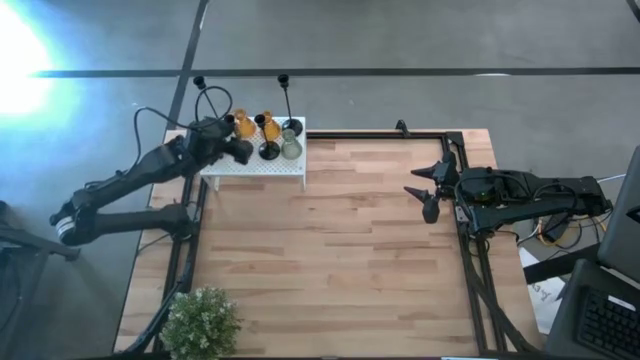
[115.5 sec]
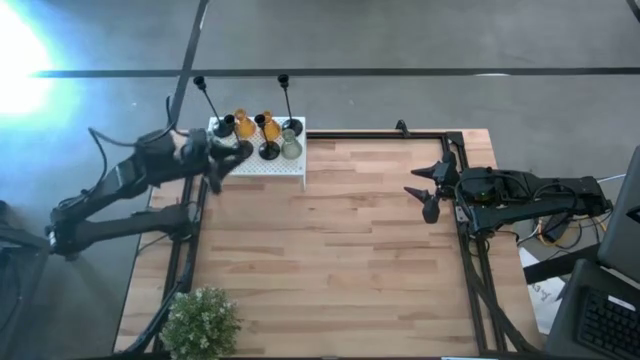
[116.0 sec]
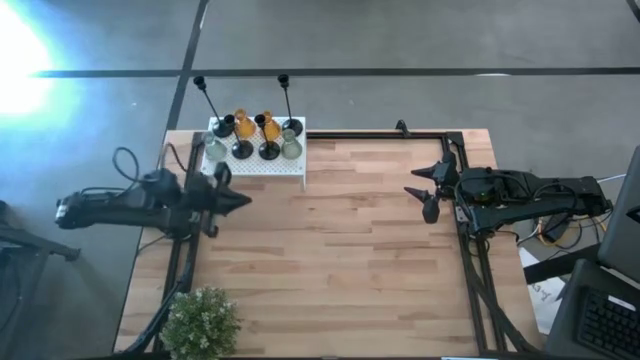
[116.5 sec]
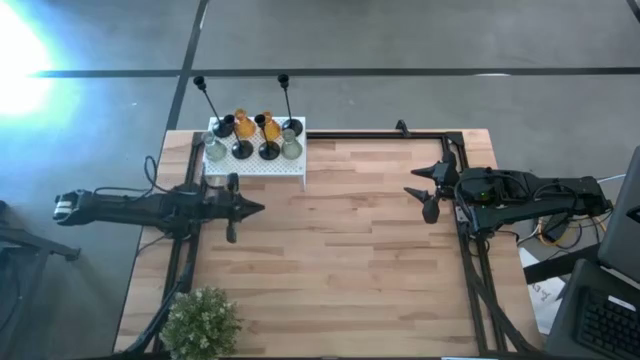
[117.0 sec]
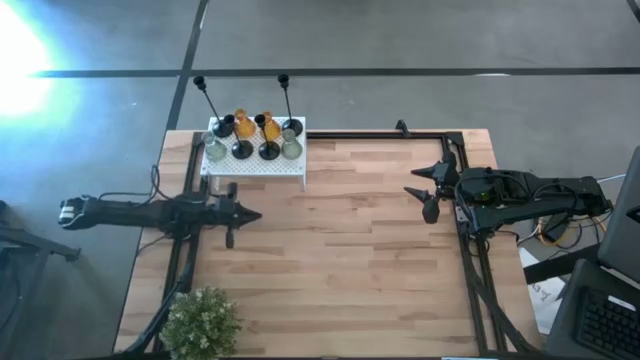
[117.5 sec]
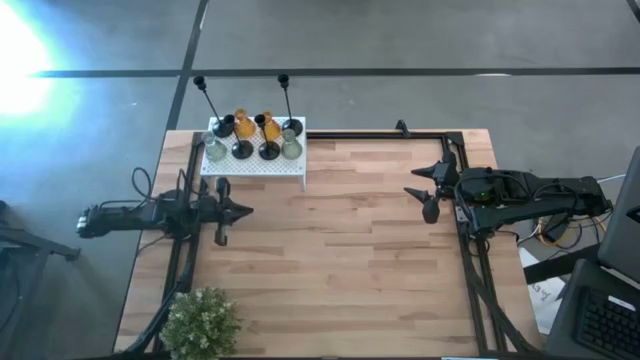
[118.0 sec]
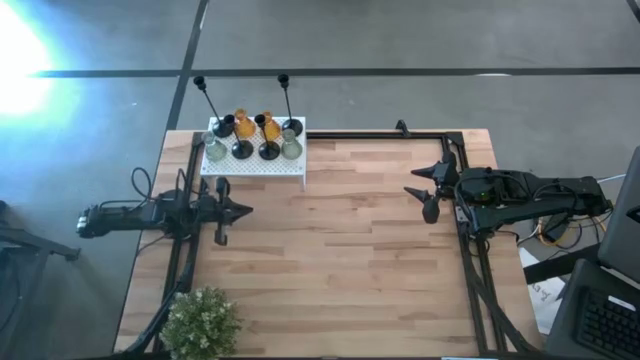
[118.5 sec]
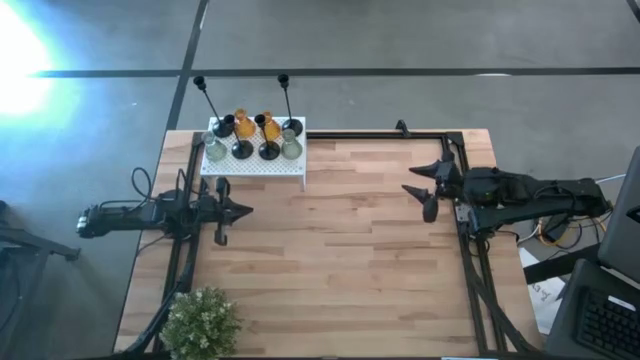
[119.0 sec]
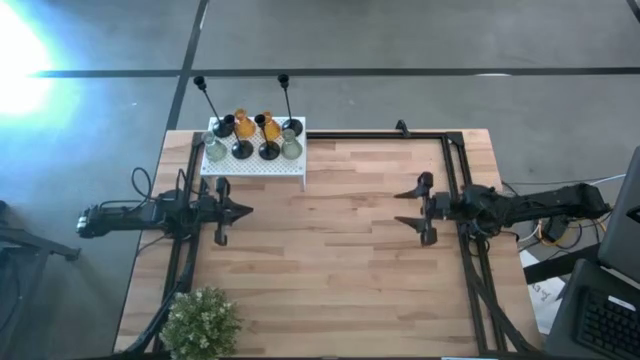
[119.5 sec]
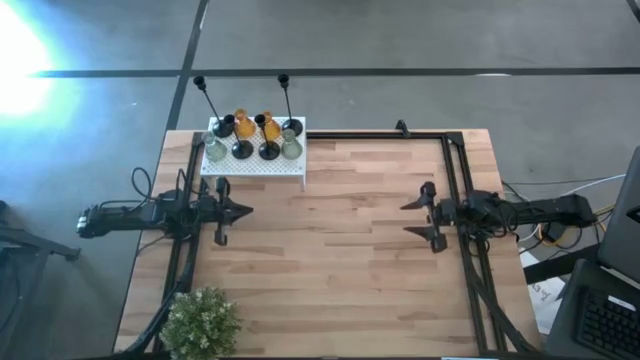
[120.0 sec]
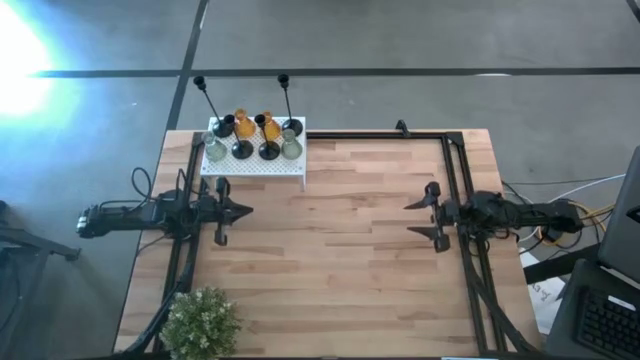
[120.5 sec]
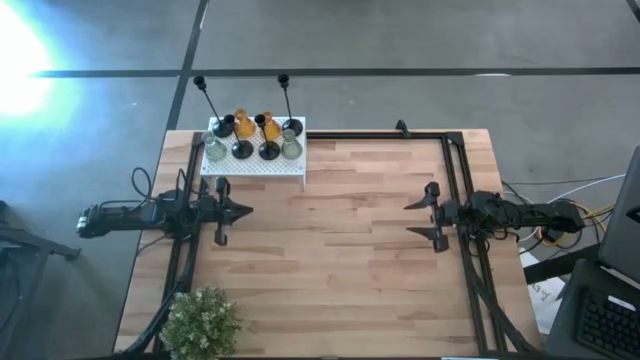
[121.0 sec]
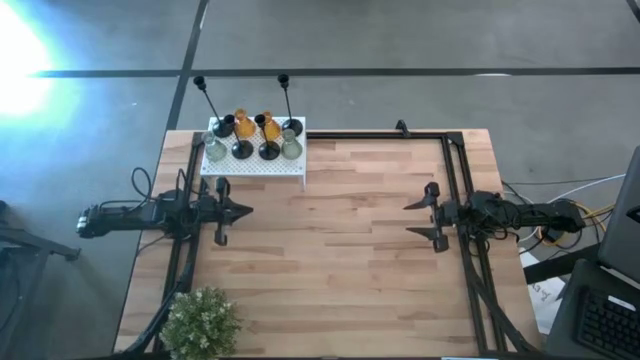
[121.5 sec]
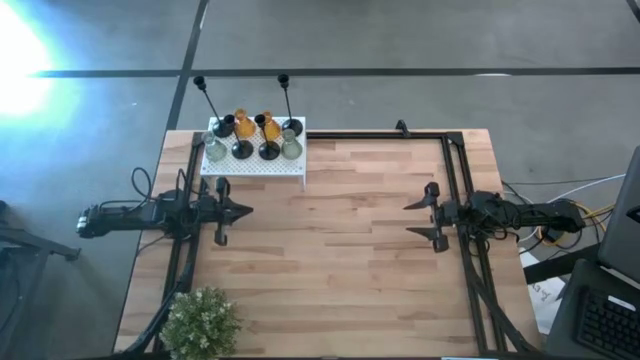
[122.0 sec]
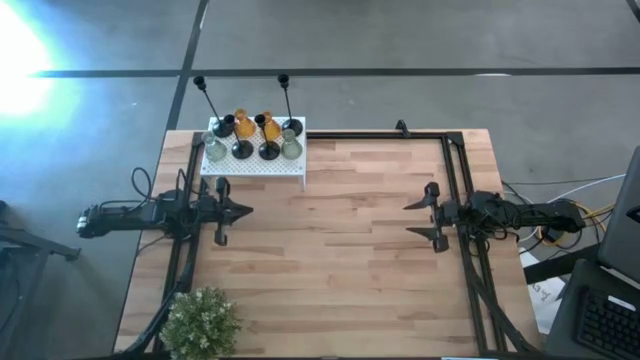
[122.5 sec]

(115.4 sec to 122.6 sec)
Task: Pick & Place candle stick holders
Return to Home Position

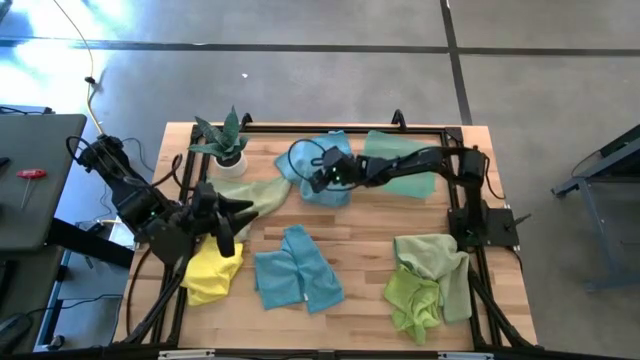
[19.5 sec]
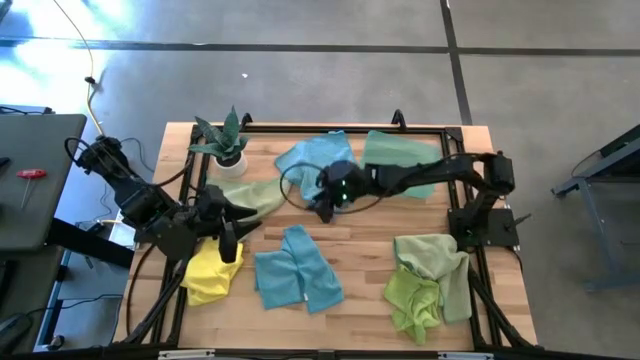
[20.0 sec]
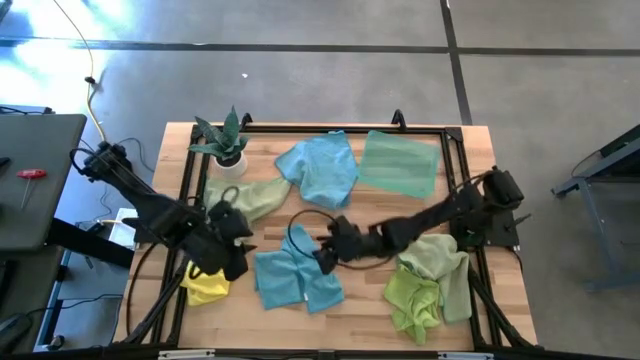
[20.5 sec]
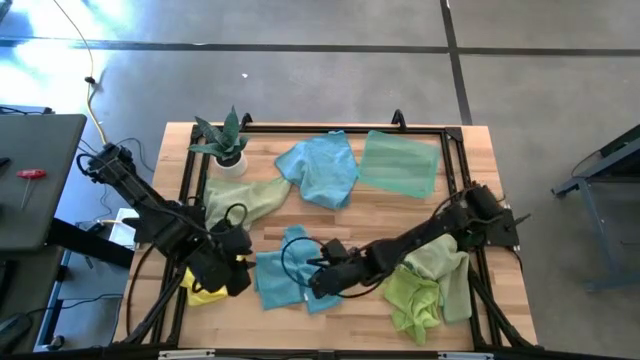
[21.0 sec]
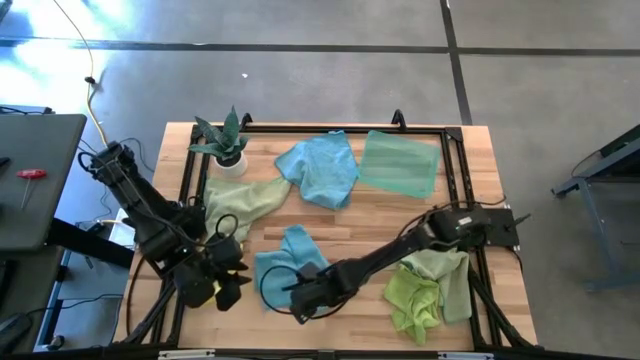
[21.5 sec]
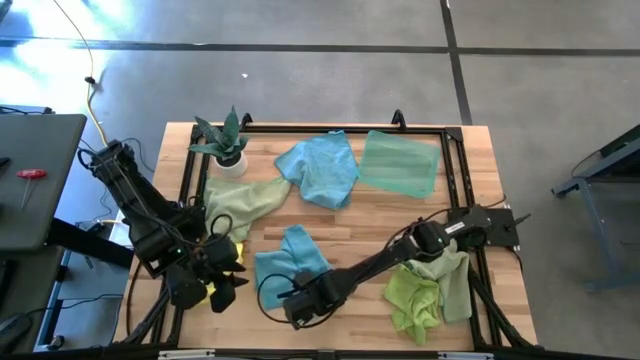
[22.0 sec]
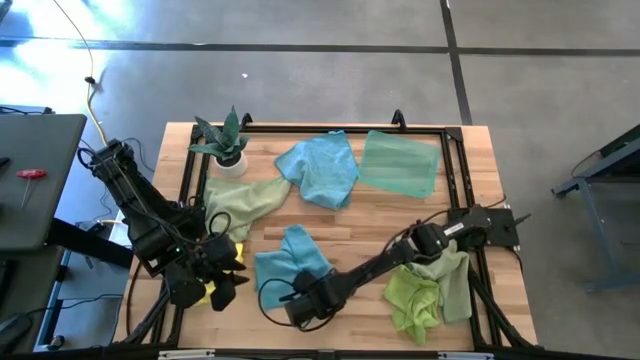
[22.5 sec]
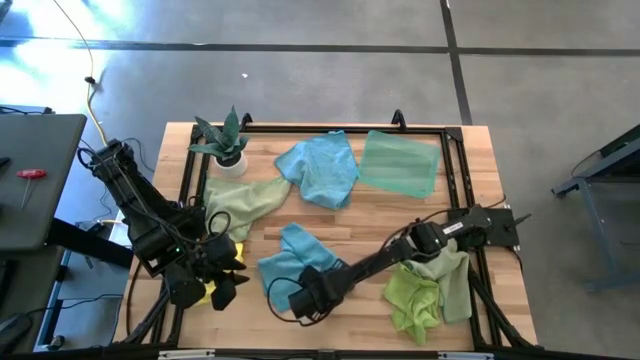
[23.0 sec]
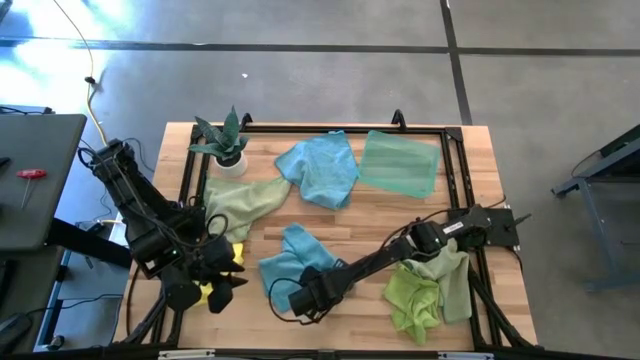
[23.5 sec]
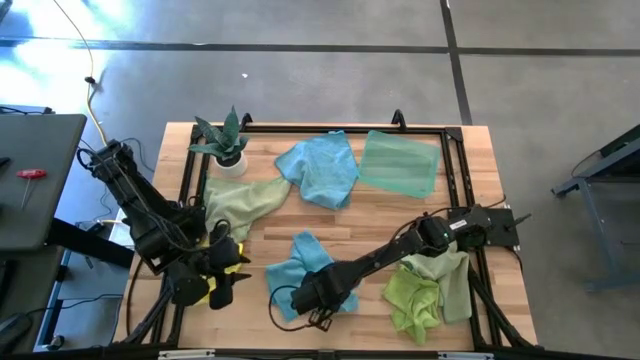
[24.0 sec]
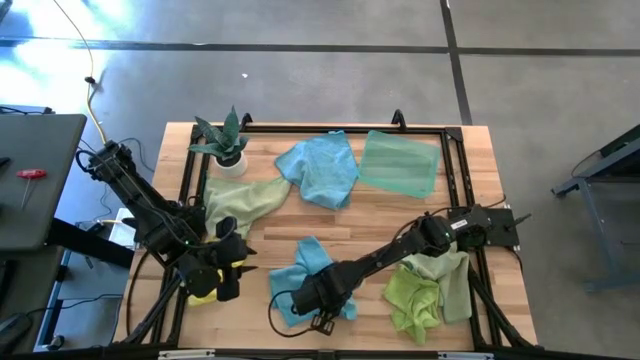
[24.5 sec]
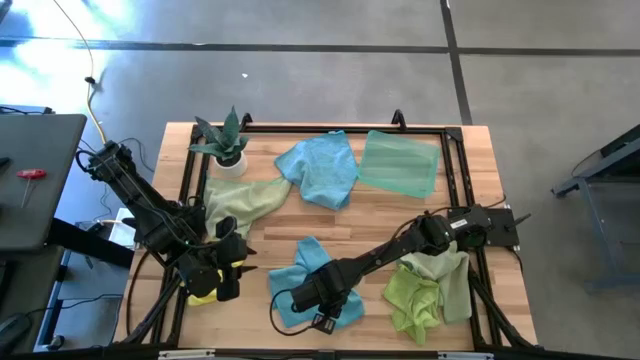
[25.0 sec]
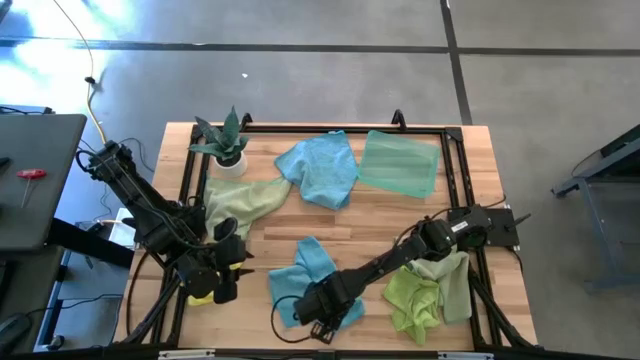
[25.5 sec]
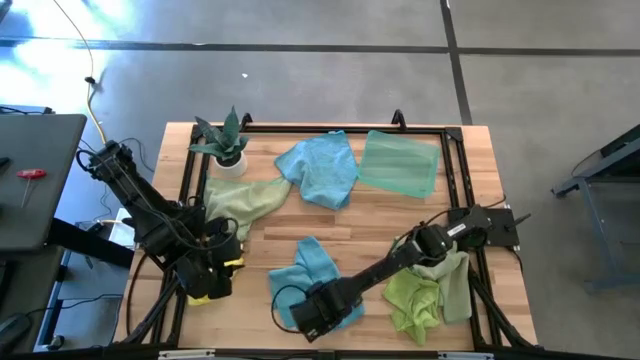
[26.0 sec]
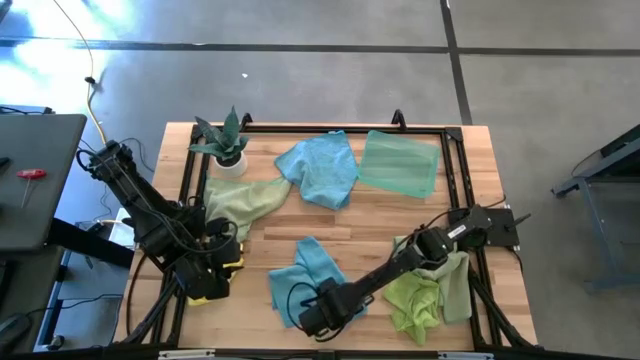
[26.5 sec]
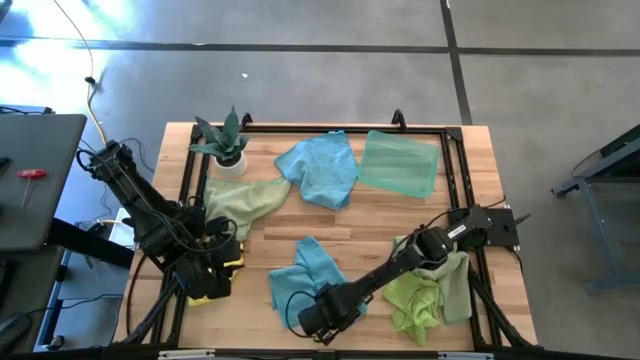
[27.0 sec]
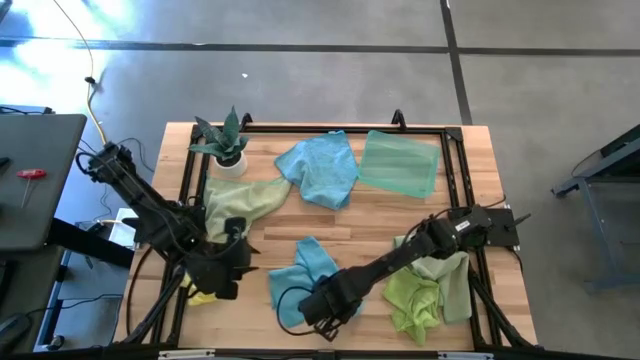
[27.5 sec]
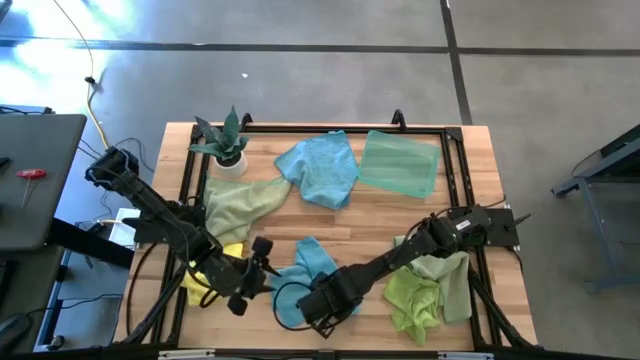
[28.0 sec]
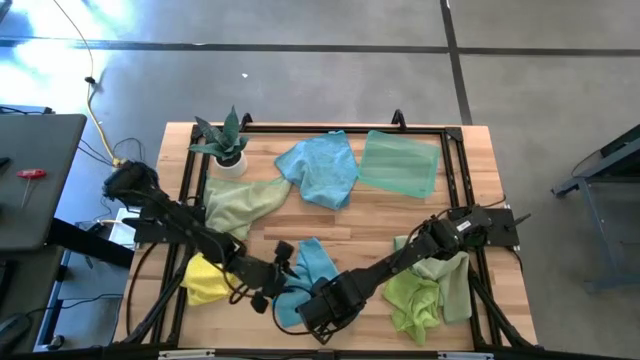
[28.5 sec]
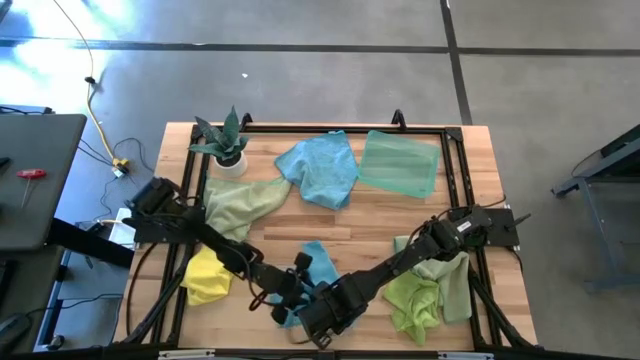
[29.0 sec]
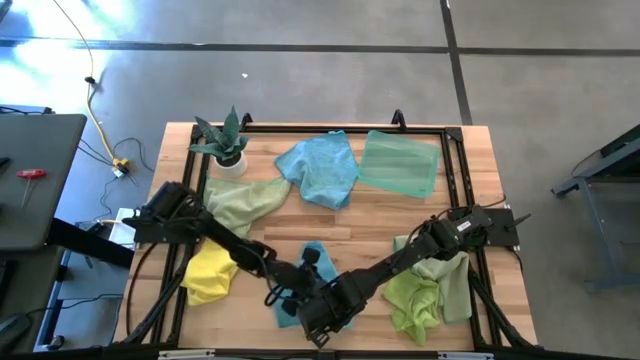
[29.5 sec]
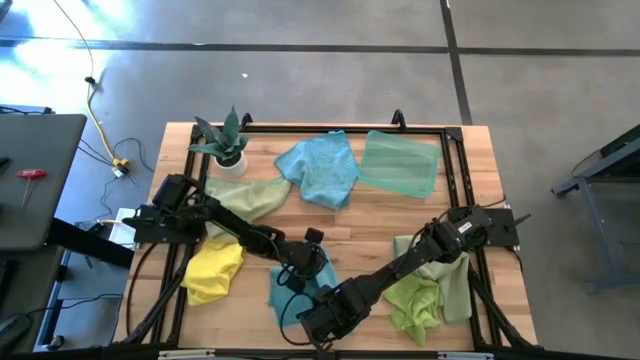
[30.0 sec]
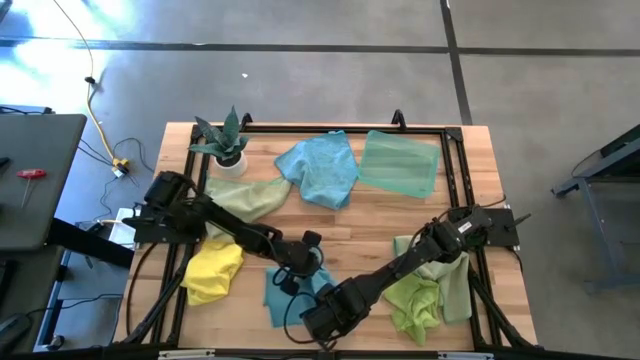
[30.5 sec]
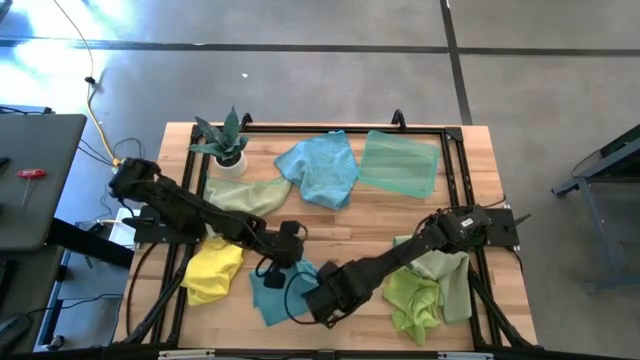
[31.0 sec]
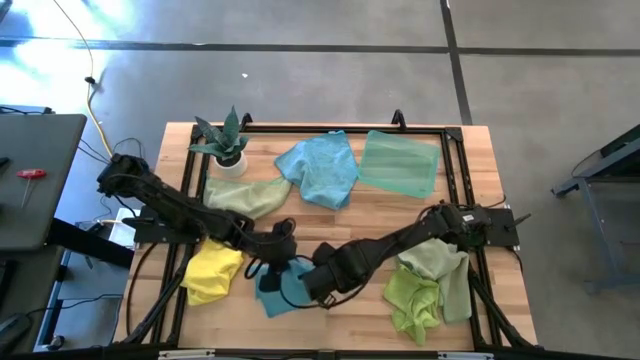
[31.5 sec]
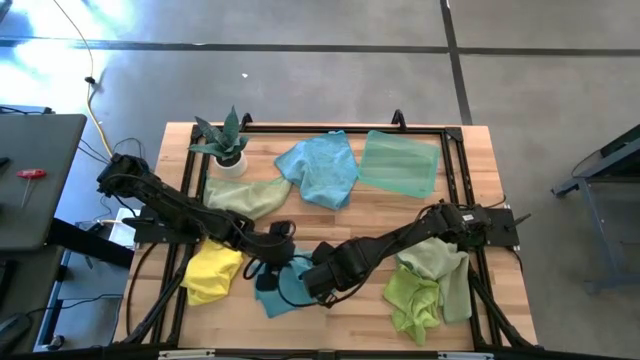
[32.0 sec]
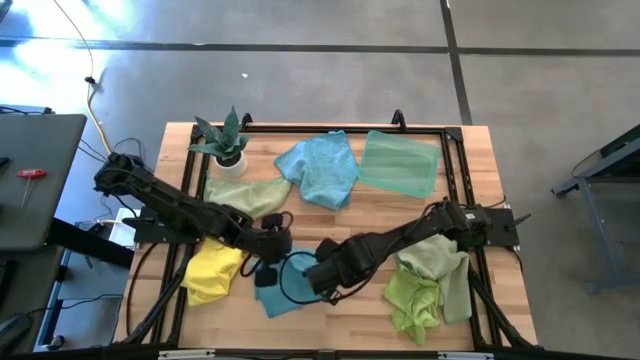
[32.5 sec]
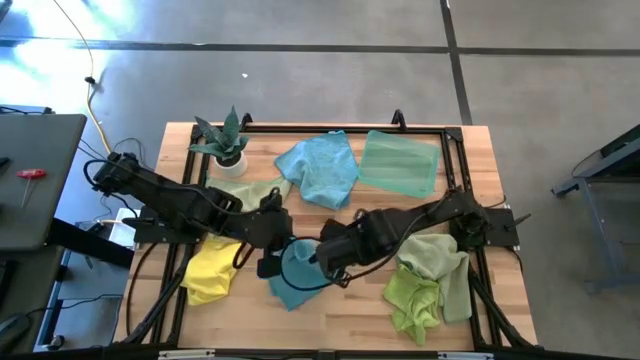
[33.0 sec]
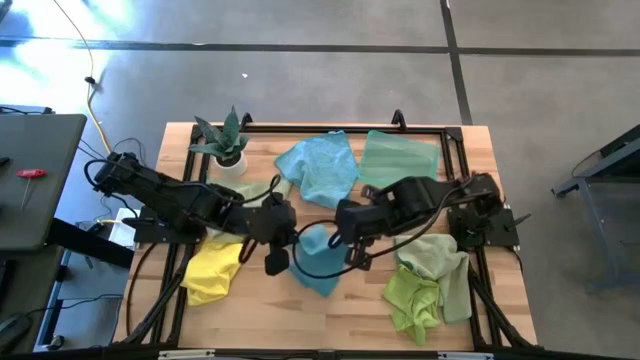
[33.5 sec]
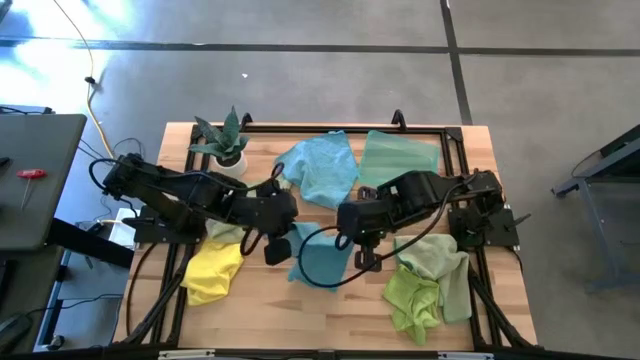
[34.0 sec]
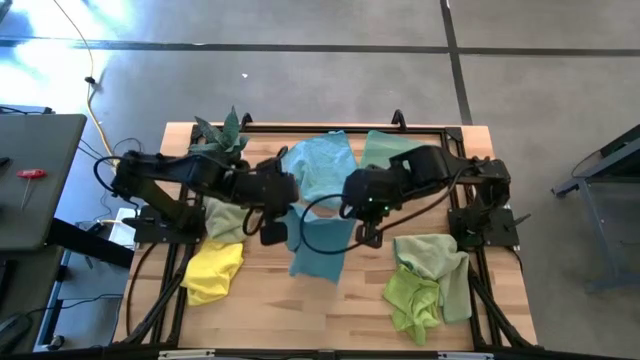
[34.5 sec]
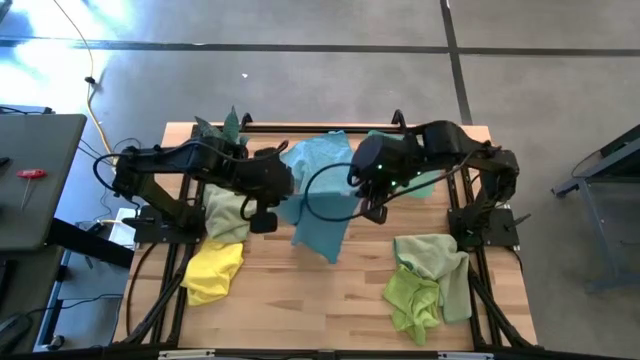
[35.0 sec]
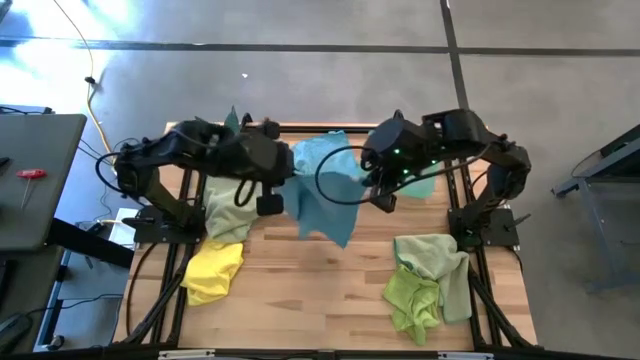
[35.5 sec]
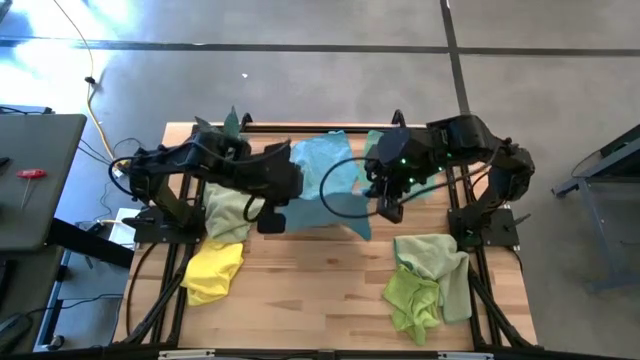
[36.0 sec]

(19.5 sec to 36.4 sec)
Task: Fold microfiber towels
Fold the bottom blue microfiber cloth
